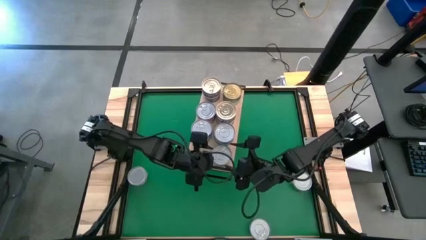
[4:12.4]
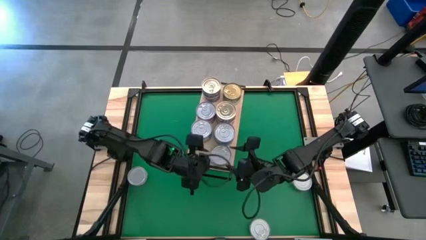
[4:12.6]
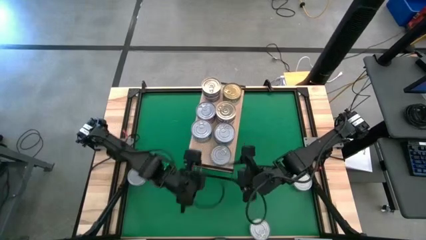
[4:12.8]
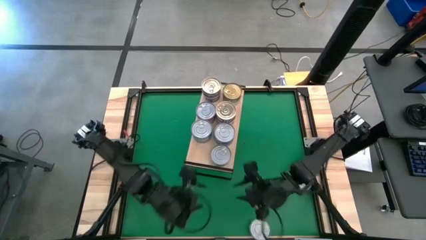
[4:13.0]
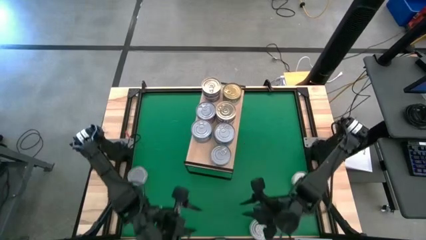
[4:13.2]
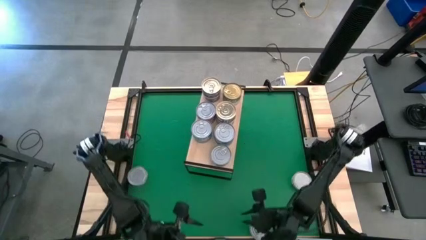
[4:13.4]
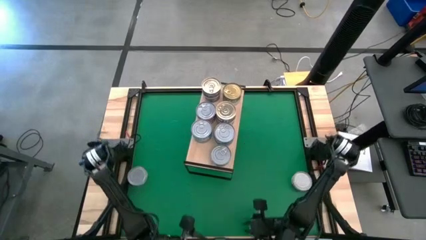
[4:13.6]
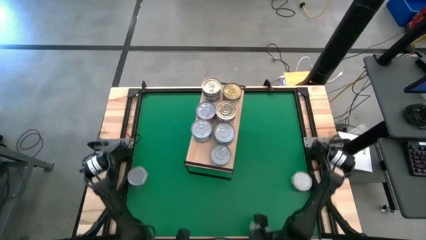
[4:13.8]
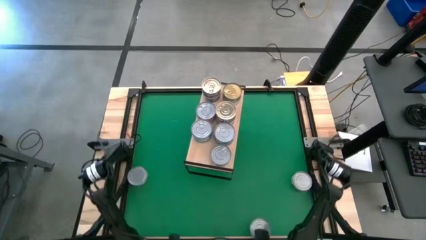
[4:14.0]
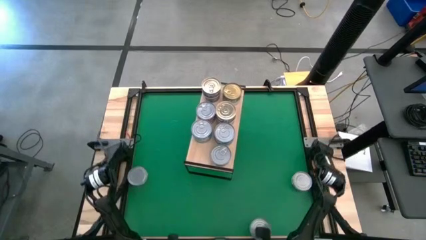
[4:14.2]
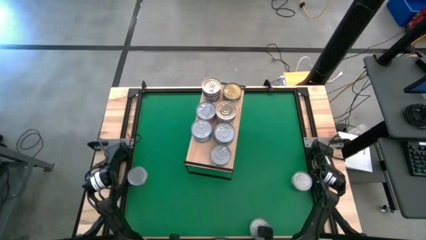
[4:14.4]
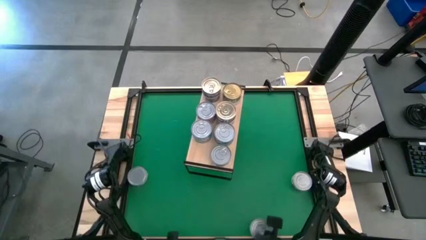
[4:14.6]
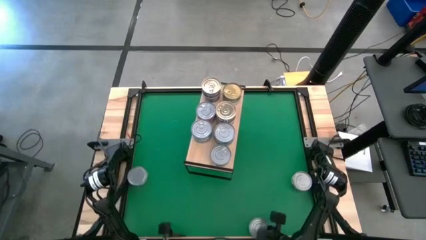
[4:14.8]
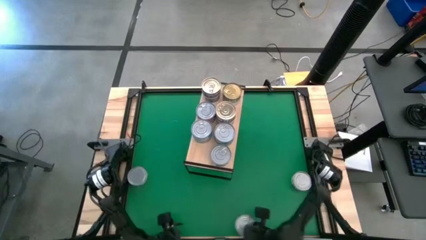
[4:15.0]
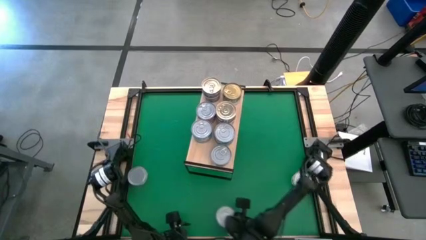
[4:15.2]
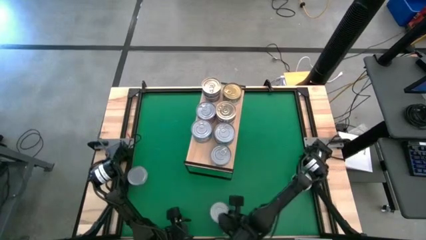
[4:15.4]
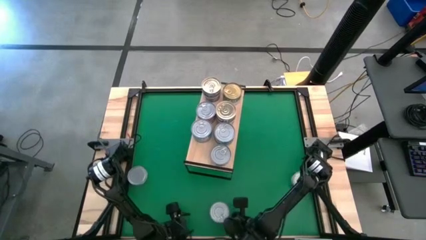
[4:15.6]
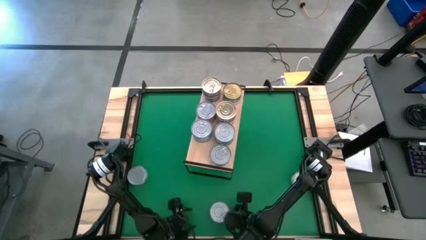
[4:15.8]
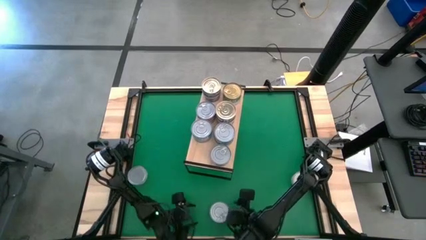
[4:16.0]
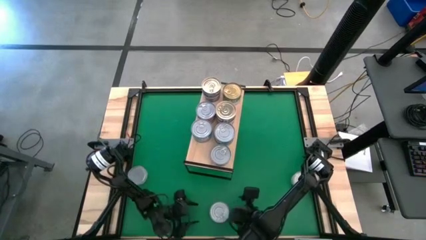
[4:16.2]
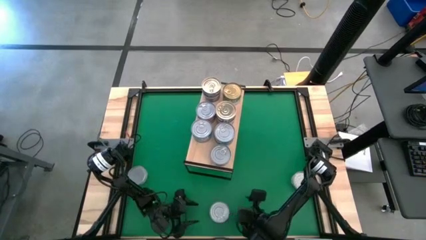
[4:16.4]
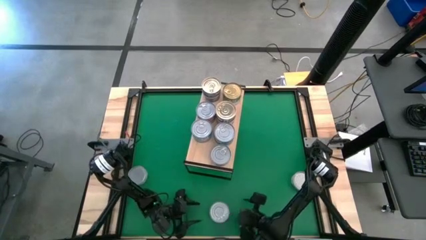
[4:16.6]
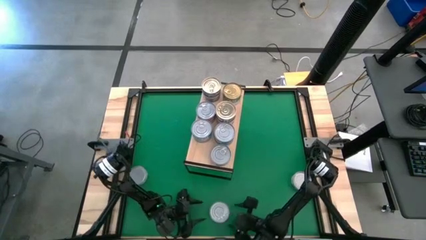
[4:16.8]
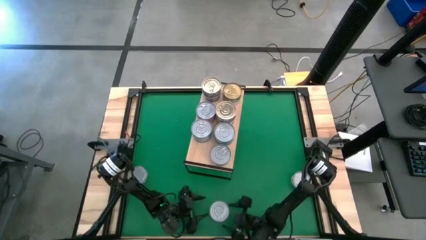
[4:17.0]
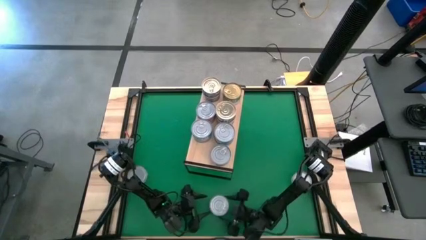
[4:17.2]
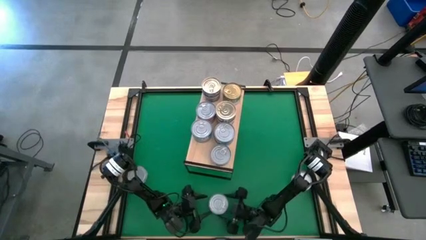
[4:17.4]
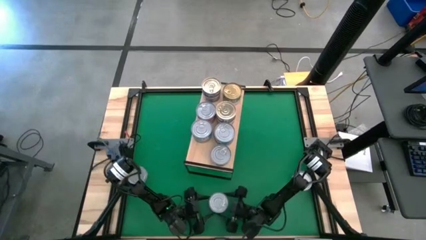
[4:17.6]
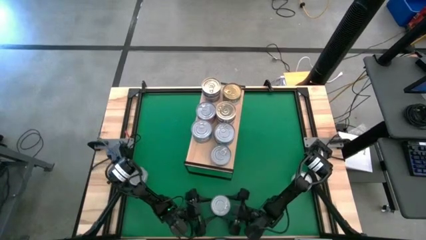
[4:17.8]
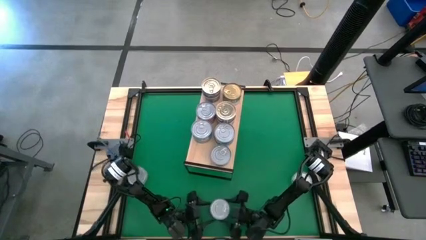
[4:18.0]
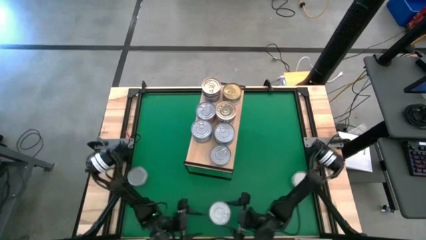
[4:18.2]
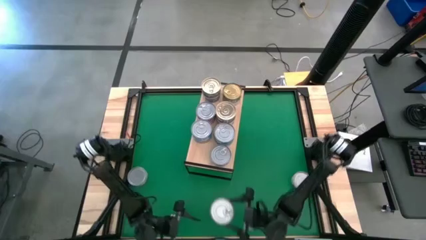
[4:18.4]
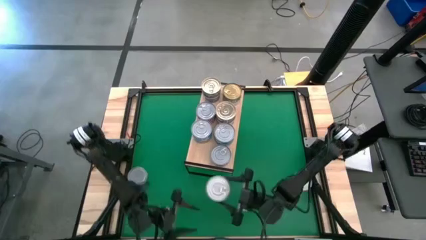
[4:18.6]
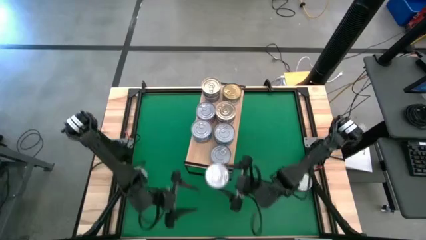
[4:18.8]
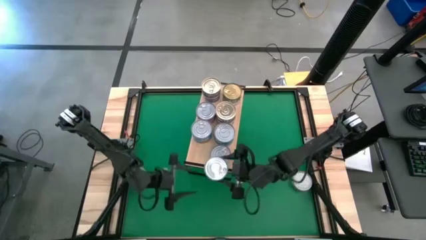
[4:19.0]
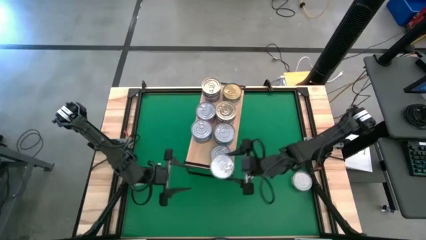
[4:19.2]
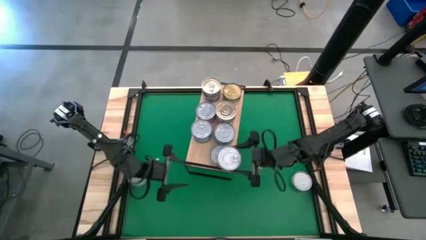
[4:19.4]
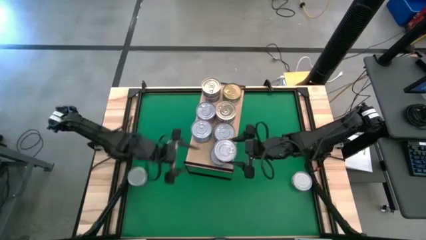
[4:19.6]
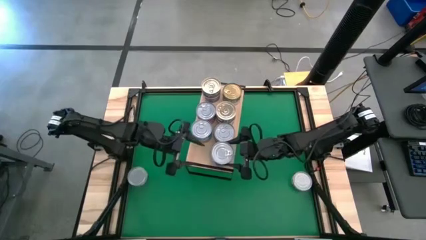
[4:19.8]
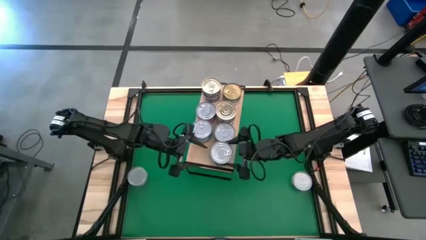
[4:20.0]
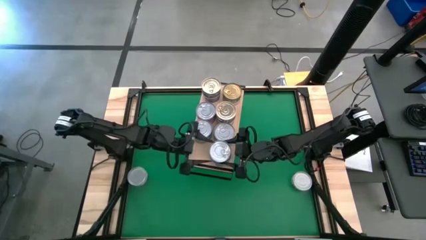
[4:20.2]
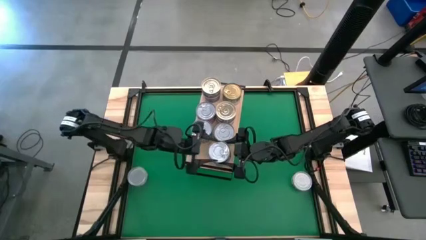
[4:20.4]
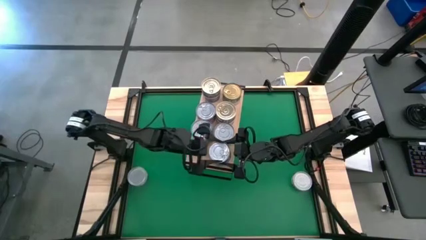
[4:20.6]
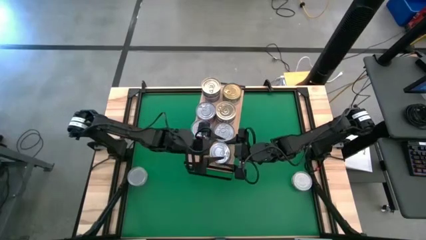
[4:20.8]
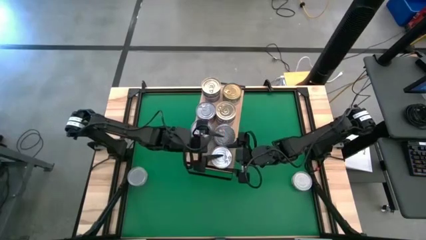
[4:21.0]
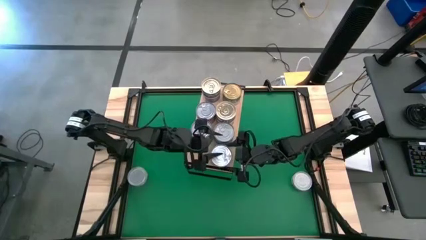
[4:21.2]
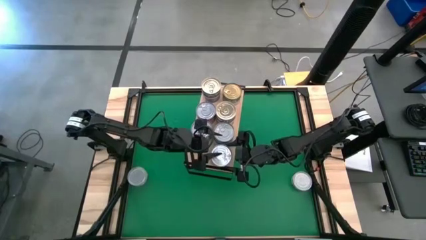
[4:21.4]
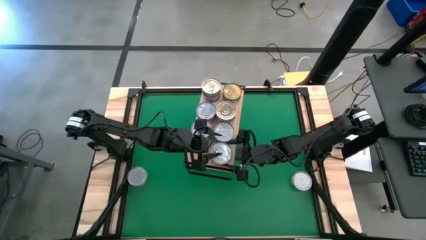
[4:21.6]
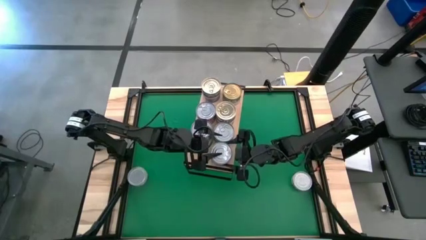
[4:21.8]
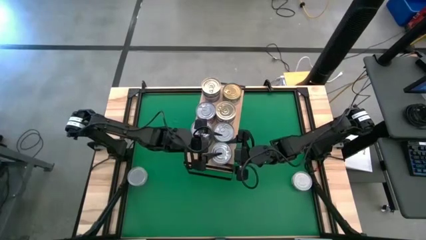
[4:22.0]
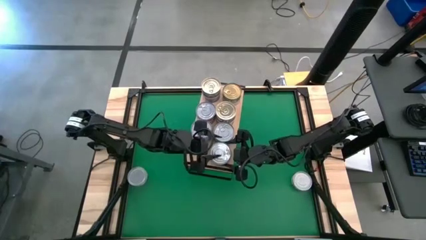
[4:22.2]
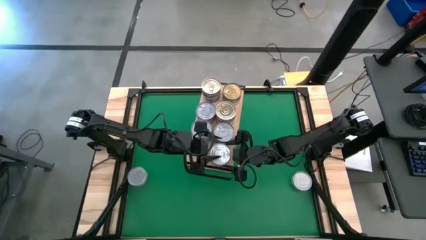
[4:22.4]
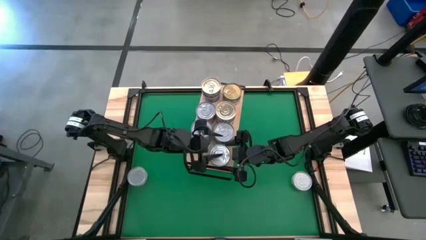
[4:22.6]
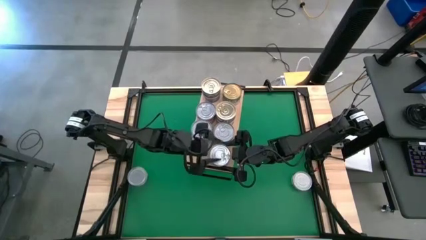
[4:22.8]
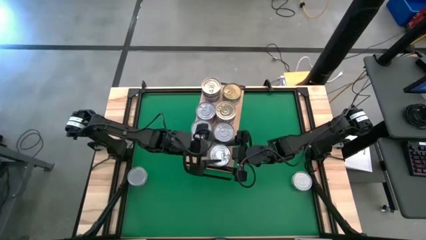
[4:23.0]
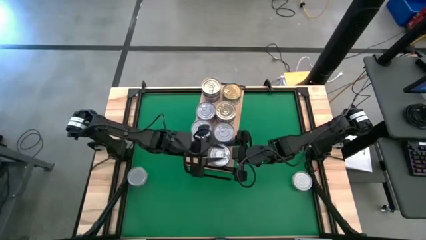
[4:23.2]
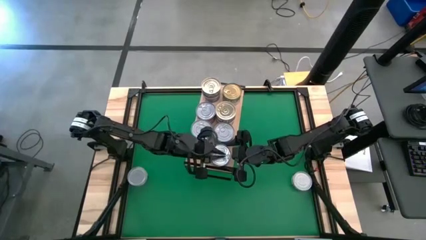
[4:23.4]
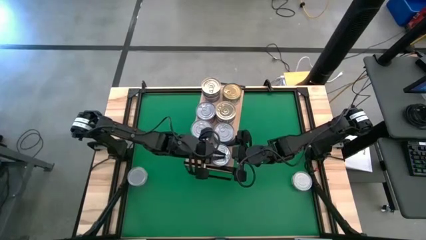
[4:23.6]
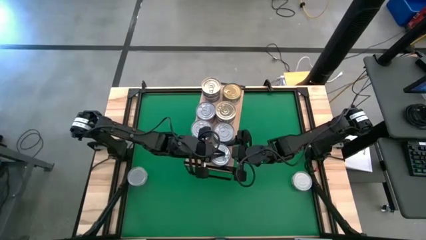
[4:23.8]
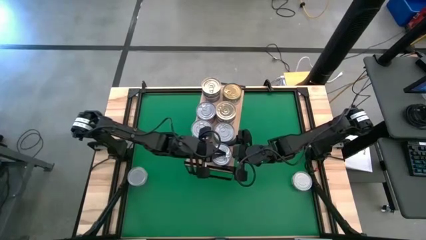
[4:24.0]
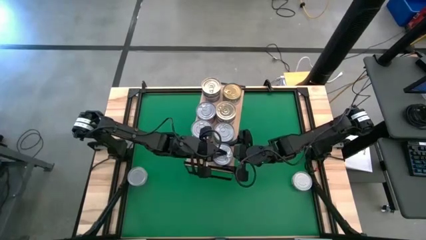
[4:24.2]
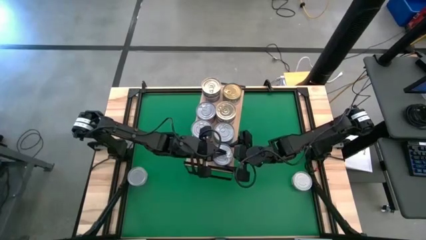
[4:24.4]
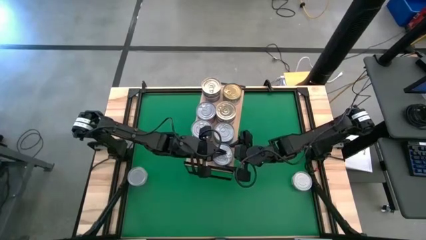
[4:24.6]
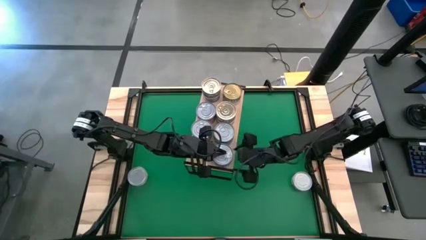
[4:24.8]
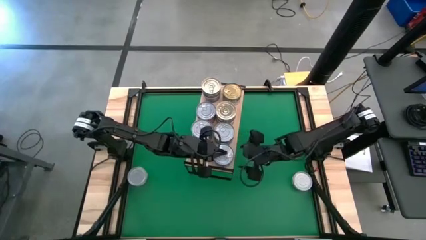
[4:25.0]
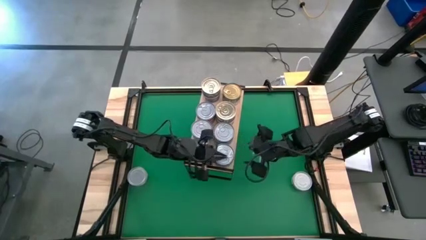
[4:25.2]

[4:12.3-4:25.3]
Task: Stack canned seafood by type on shelf
Stack the blue tuna can on top of the other blue can on the shelf

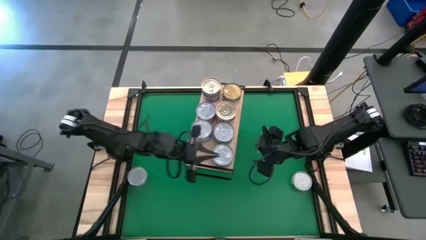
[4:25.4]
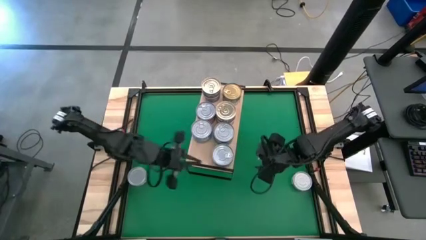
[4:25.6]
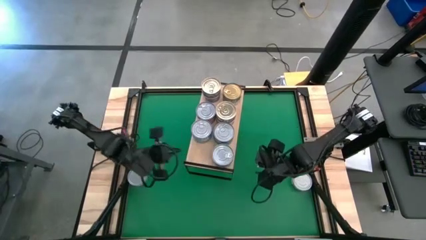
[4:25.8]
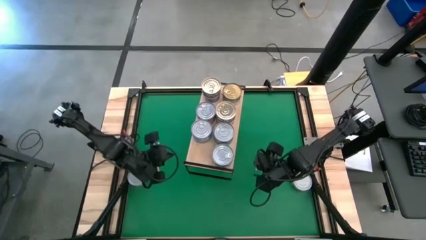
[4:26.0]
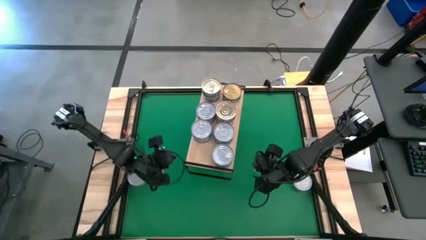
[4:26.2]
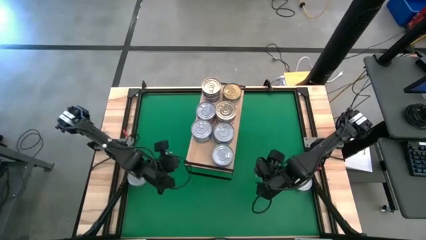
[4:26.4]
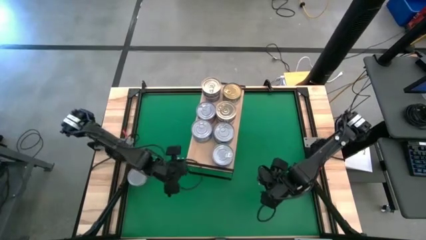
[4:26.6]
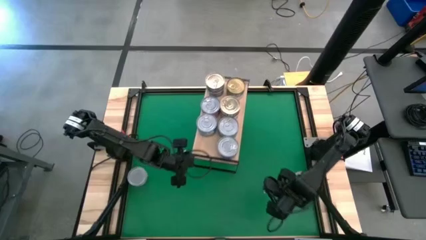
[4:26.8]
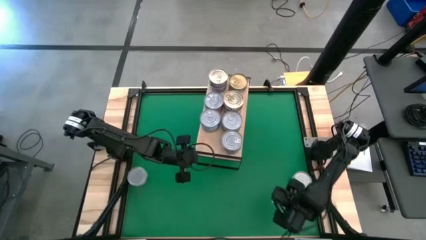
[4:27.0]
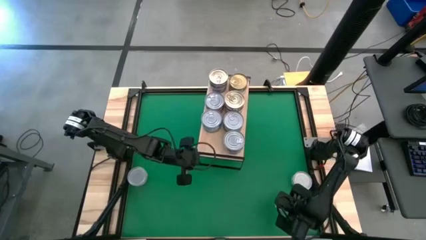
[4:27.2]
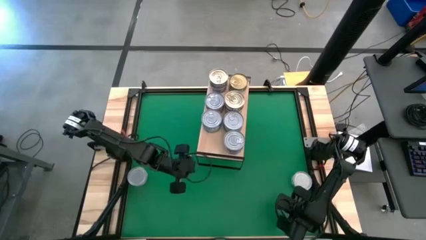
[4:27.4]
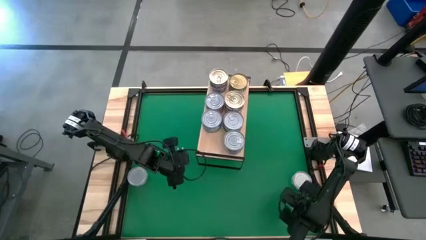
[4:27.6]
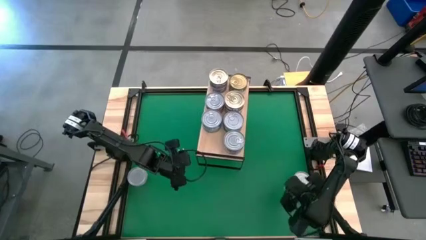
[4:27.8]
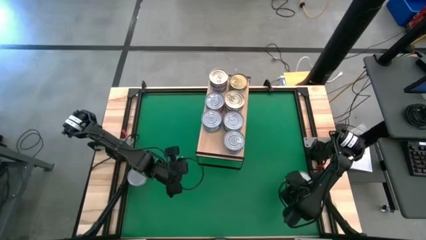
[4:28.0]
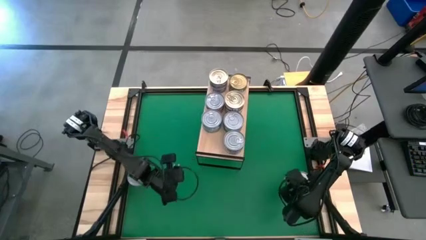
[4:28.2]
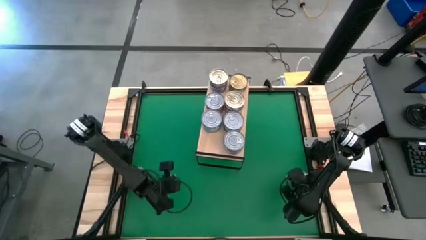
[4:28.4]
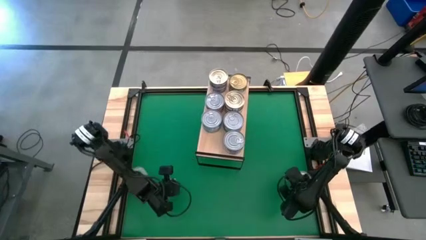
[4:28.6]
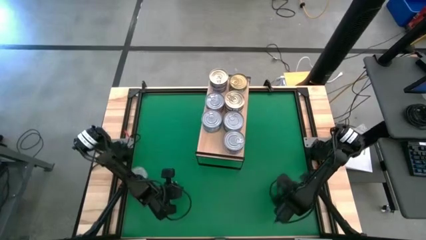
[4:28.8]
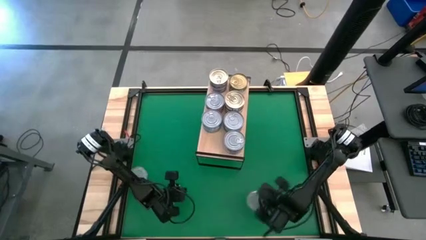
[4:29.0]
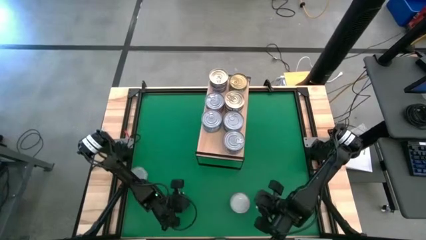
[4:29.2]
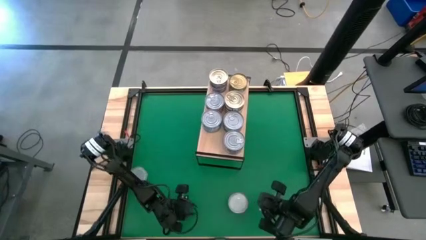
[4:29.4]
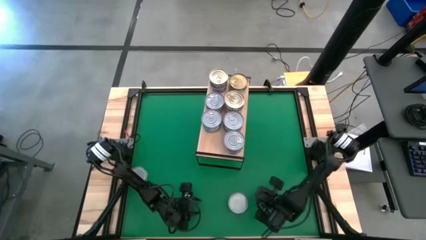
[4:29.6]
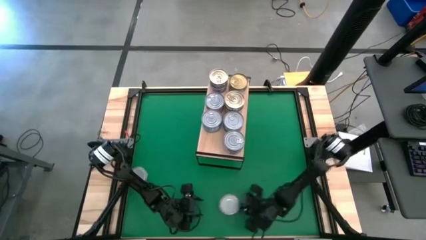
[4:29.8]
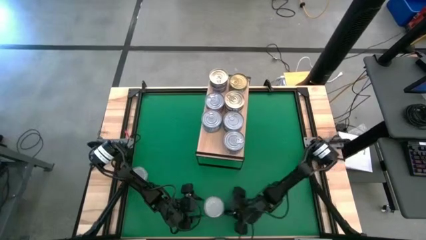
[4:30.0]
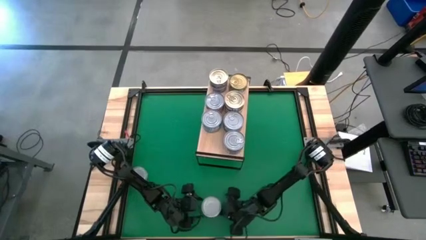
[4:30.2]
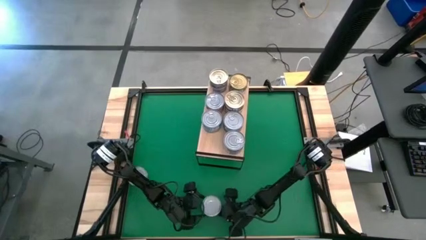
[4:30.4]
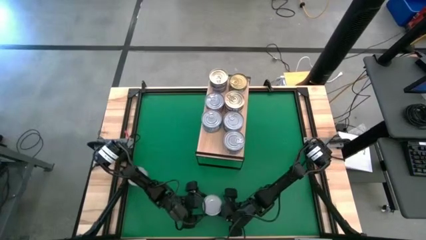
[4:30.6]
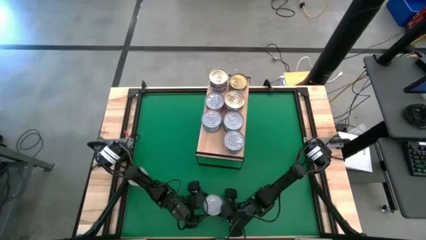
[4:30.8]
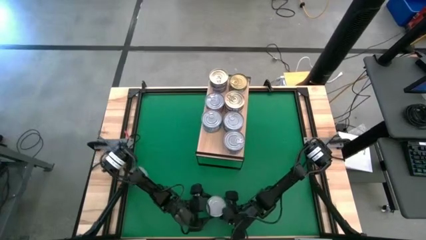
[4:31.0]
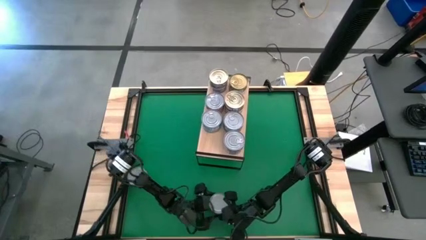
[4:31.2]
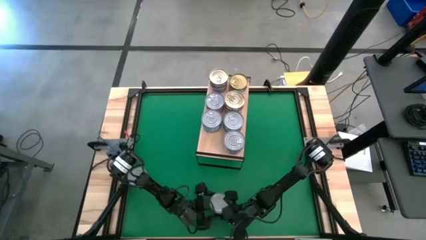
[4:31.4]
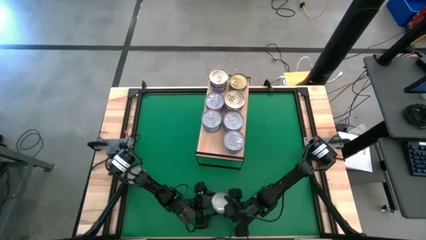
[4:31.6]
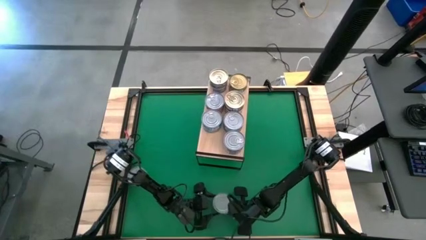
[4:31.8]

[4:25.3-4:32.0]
Put the green tuna can on the shelf
